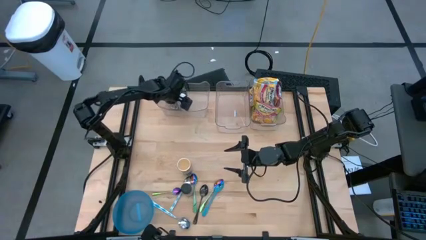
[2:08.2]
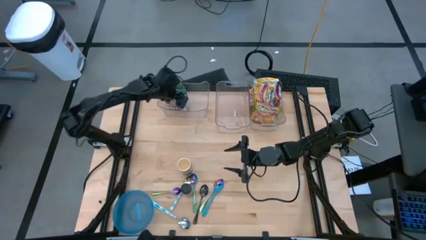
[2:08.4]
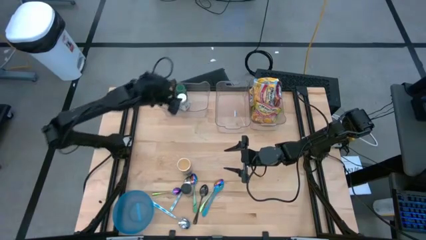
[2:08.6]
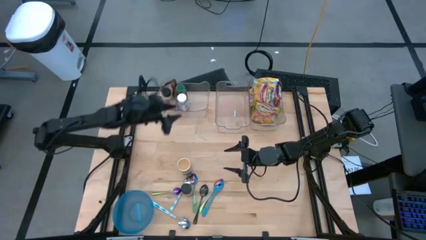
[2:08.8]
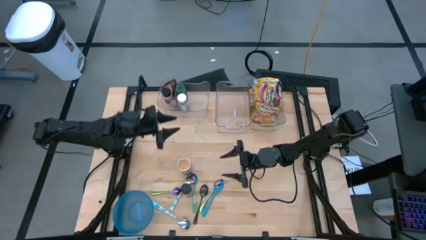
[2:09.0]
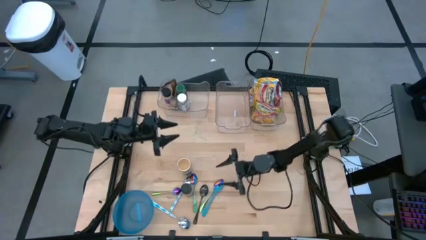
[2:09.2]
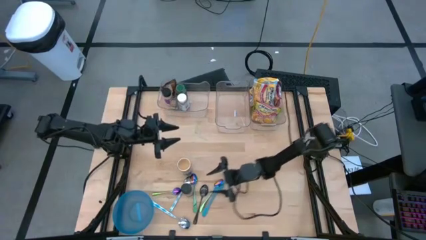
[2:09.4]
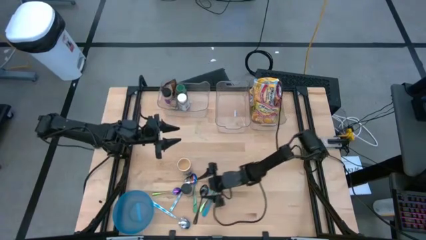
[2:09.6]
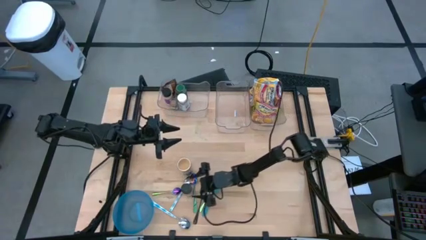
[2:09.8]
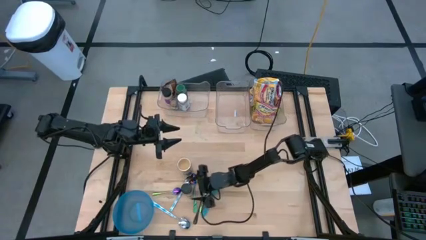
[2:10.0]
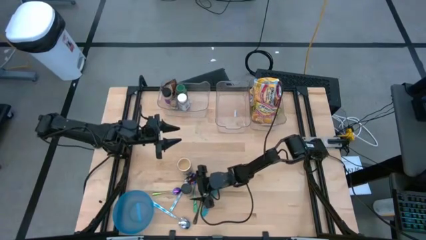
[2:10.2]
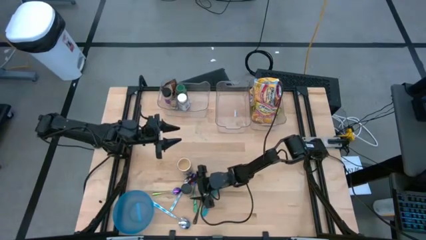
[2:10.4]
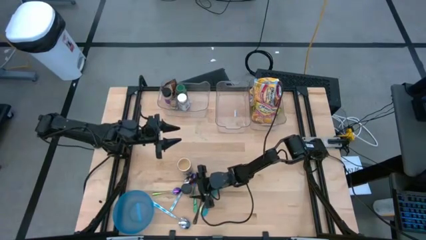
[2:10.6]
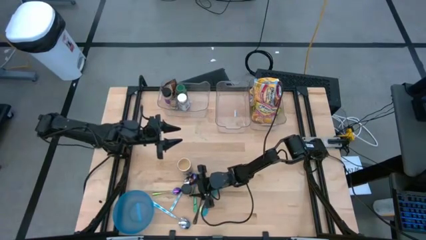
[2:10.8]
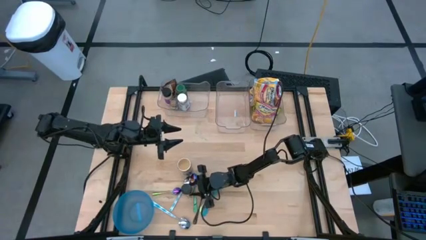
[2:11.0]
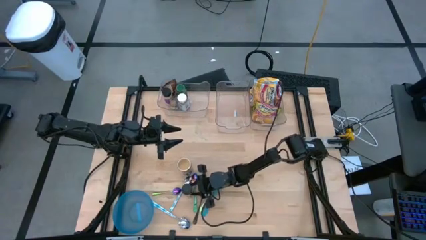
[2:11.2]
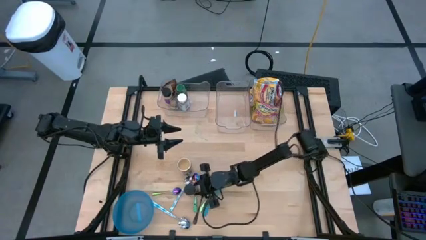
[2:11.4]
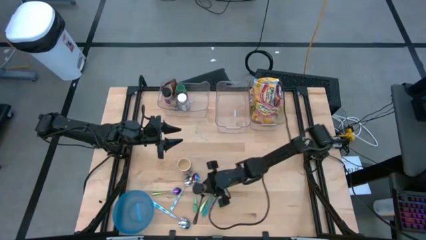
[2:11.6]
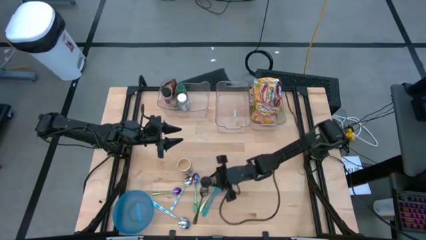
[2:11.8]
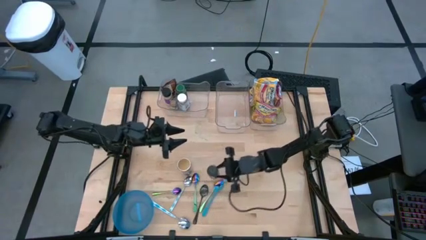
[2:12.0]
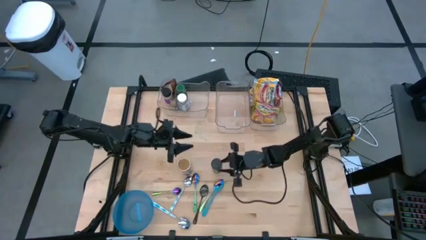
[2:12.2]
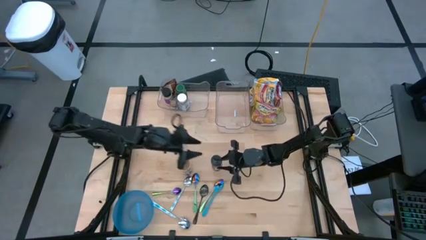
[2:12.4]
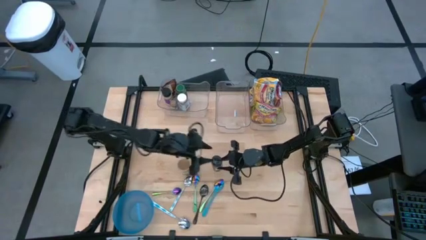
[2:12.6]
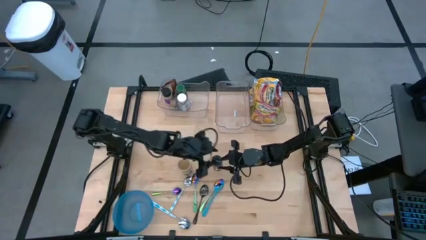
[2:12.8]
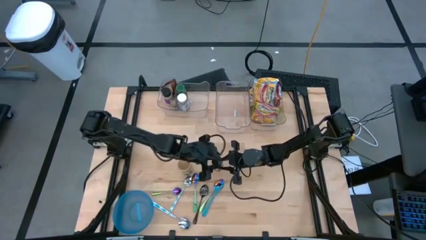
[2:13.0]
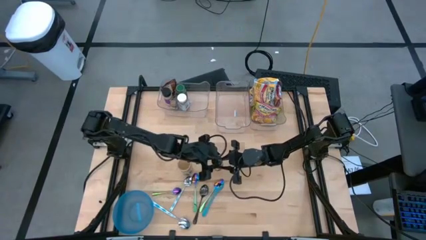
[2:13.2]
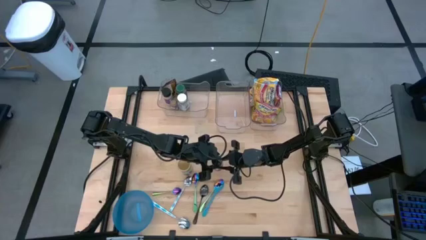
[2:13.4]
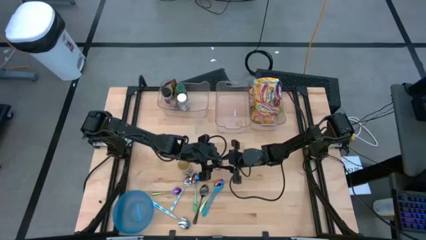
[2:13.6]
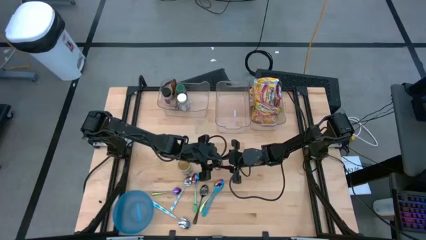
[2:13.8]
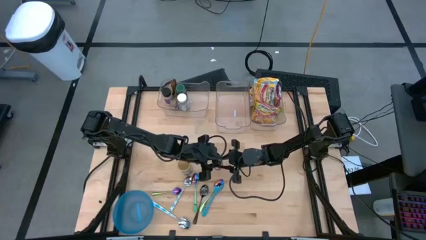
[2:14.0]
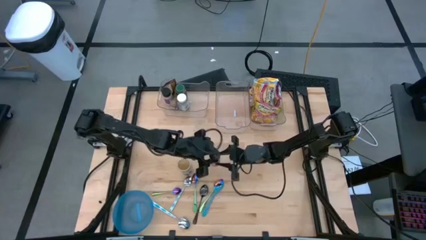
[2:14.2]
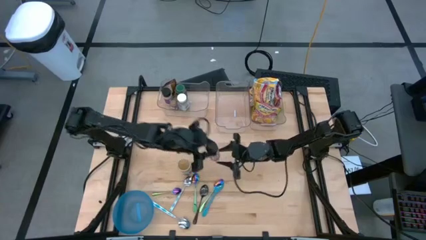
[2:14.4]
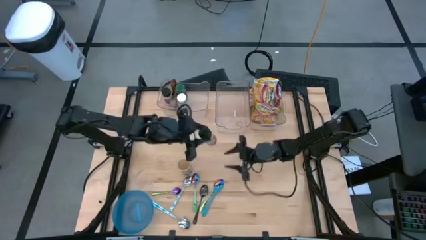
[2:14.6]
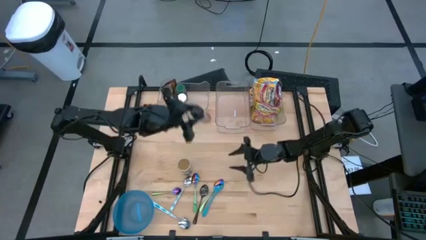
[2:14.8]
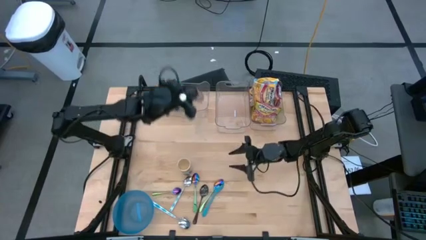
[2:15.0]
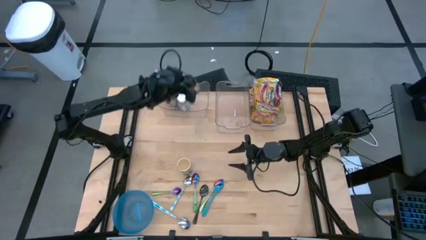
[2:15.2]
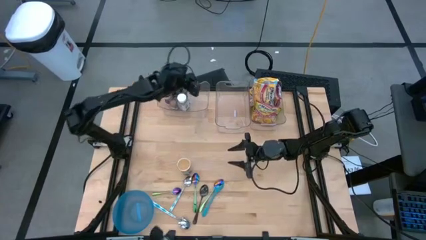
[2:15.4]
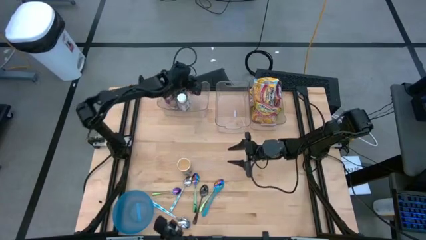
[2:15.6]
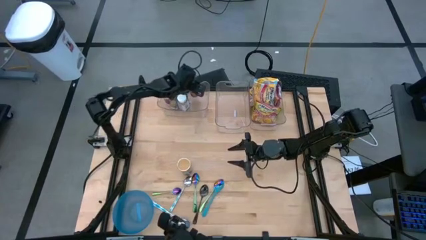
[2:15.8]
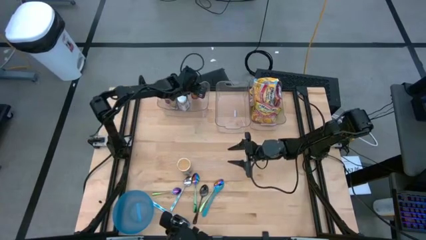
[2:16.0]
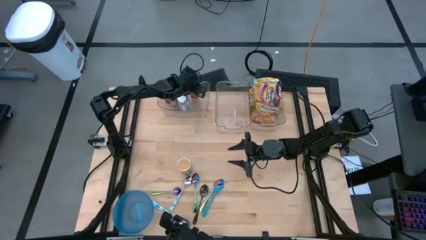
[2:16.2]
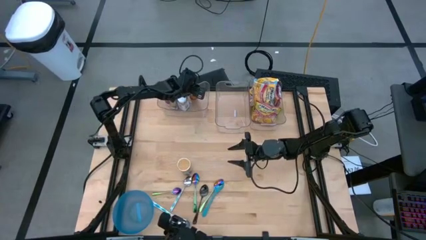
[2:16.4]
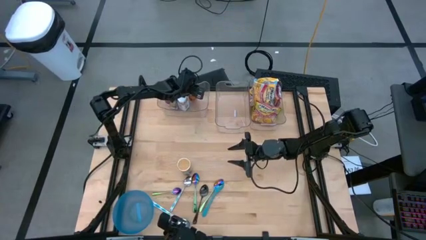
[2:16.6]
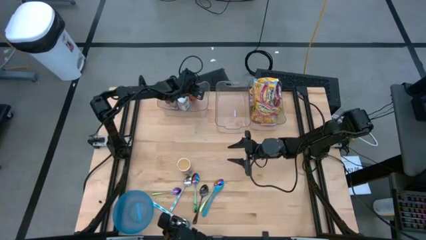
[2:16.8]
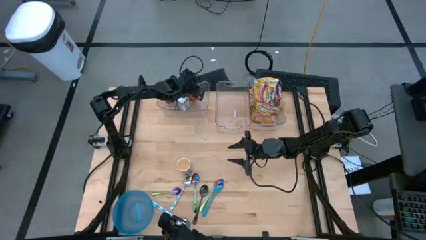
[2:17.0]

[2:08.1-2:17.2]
Task: Pick & Place Food Item
Put the orange seasoning bottle into the left transparent bin

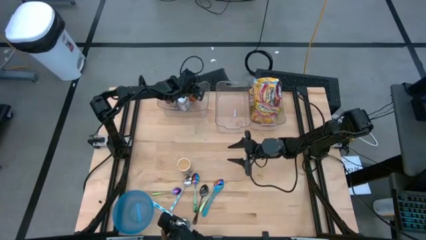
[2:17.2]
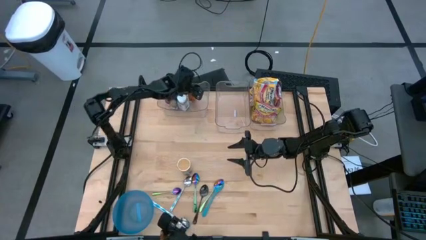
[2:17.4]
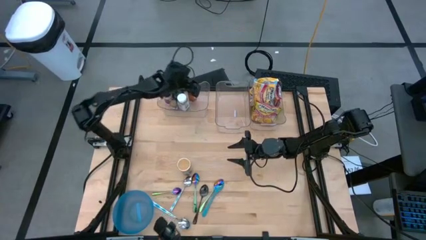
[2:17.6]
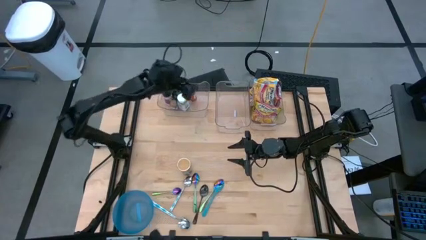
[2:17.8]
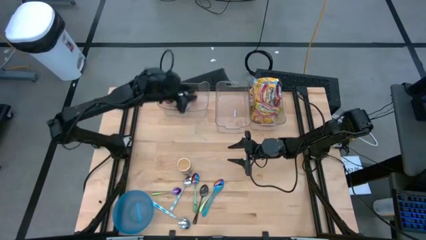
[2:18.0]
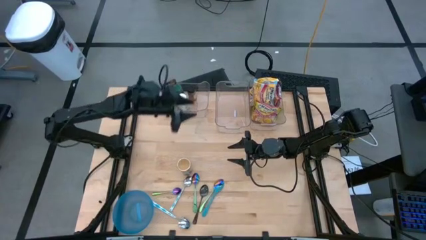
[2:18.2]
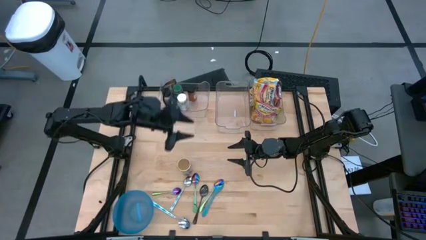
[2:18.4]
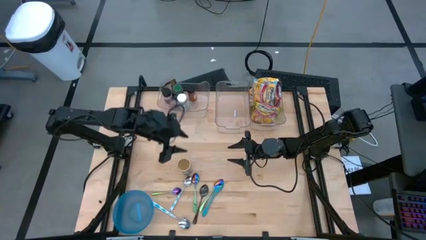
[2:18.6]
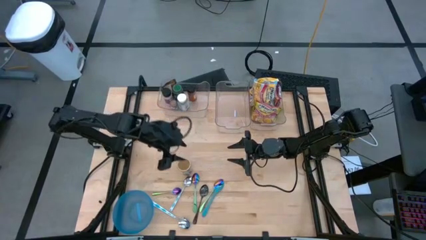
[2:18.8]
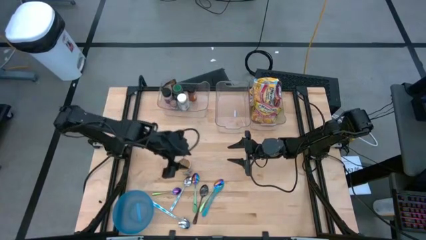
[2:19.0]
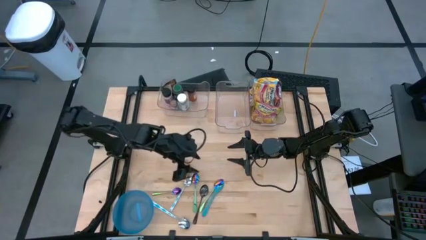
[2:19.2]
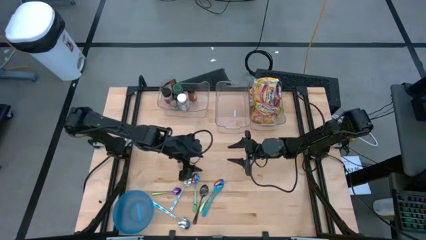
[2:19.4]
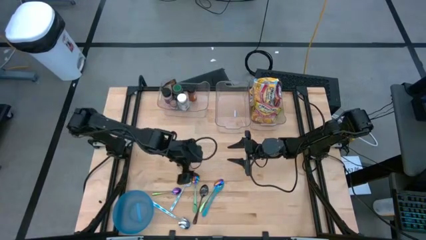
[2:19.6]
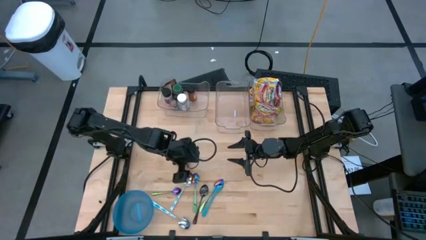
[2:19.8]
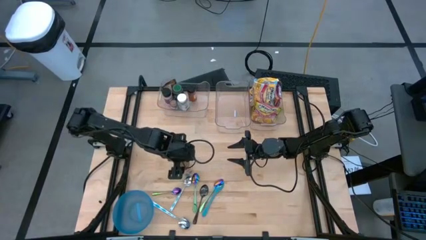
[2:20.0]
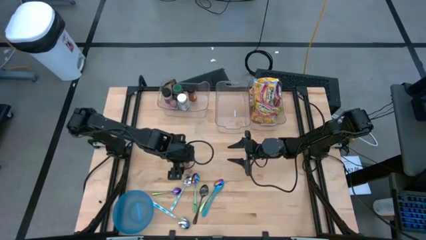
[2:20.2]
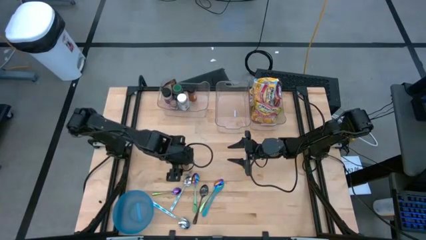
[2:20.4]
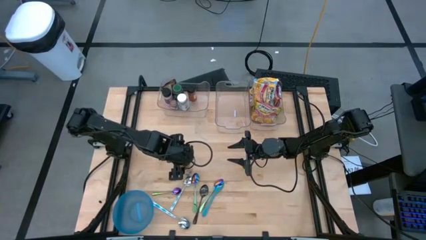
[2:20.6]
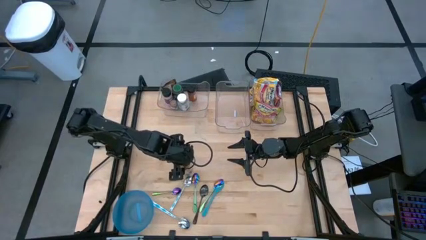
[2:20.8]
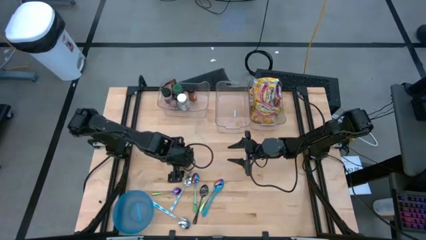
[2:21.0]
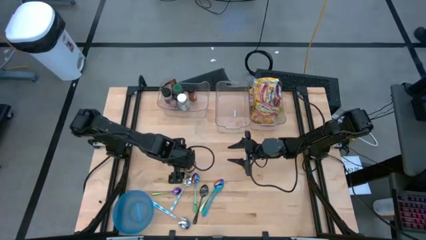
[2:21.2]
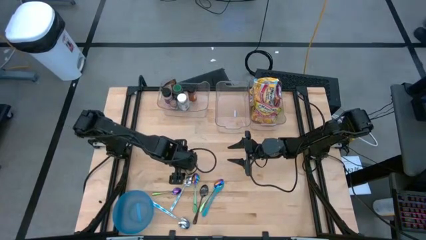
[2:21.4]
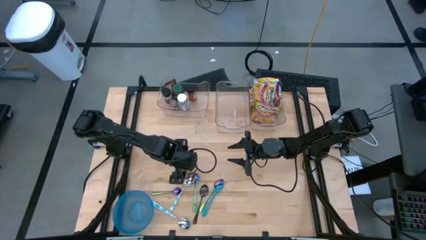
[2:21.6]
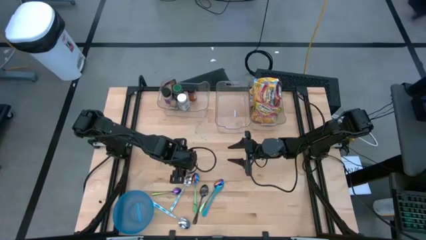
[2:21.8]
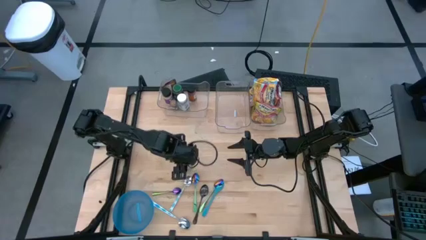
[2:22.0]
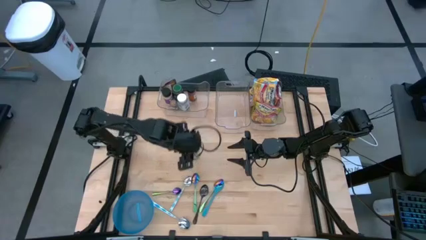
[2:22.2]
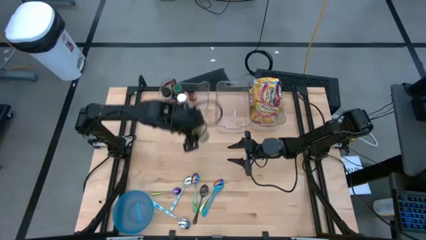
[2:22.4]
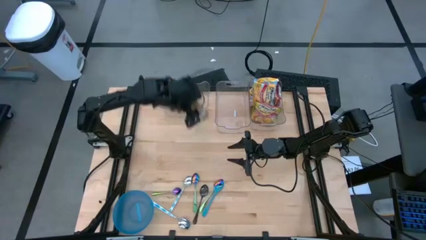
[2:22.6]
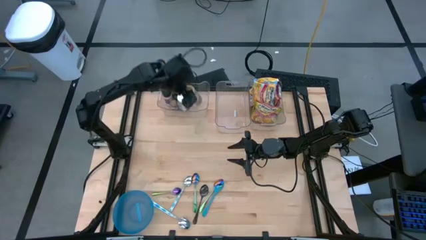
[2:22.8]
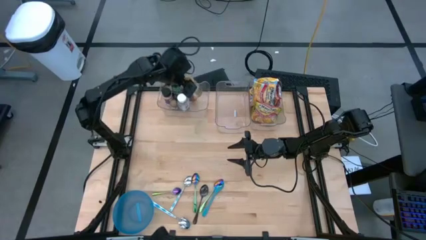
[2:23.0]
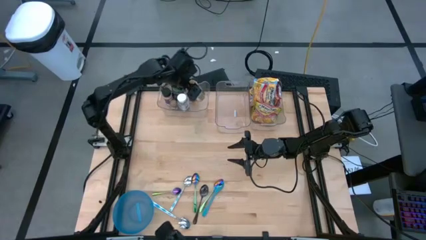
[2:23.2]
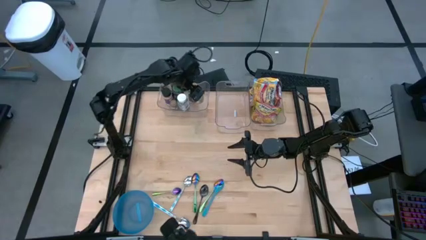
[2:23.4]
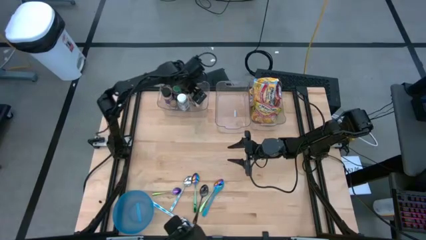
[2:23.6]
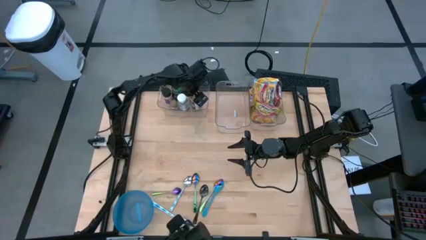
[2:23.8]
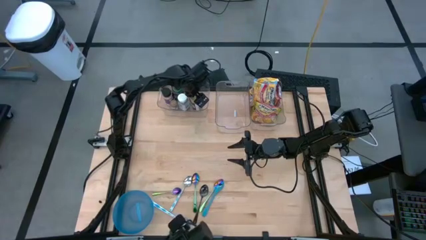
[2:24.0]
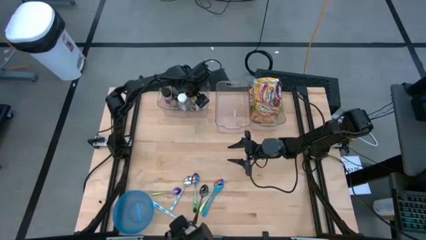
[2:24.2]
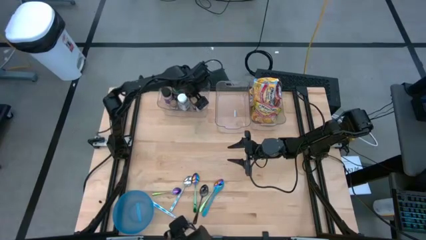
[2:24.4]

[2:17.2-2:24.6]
Put the gold seasoning bottle into the left transparent bin
